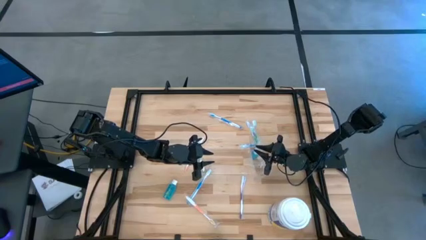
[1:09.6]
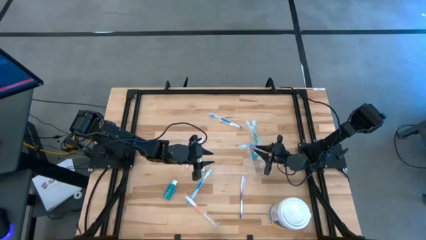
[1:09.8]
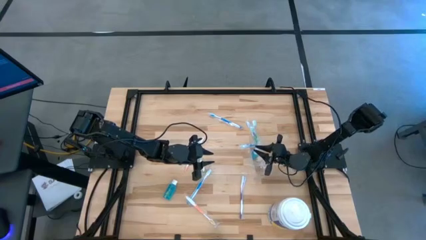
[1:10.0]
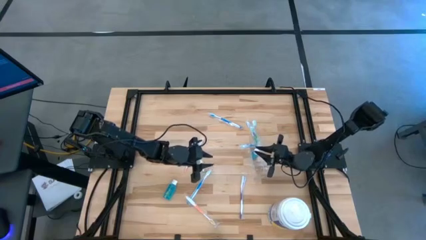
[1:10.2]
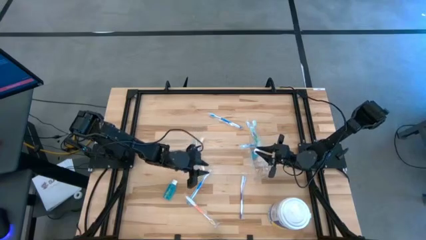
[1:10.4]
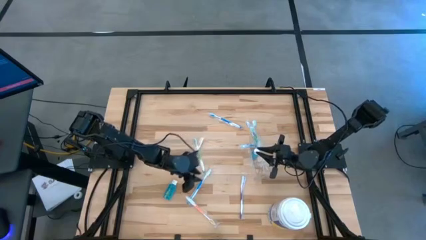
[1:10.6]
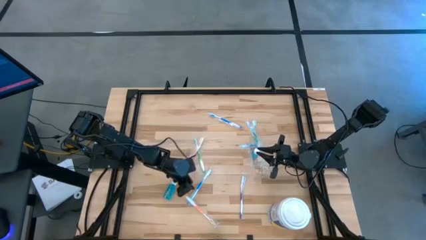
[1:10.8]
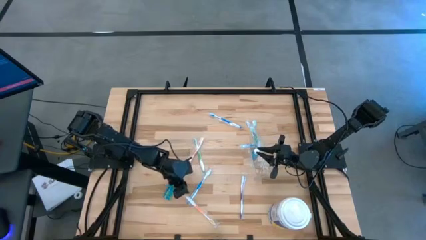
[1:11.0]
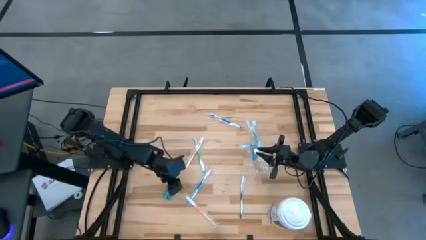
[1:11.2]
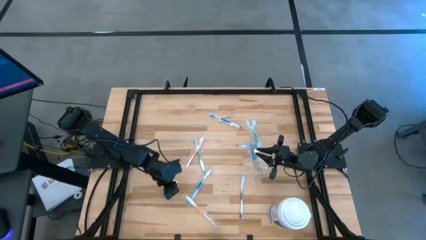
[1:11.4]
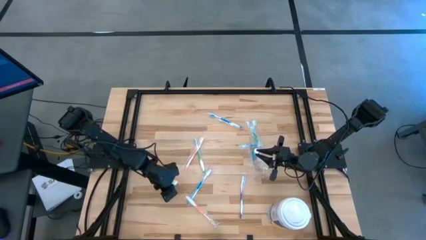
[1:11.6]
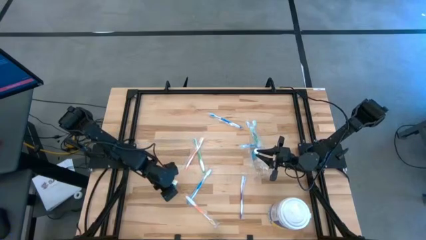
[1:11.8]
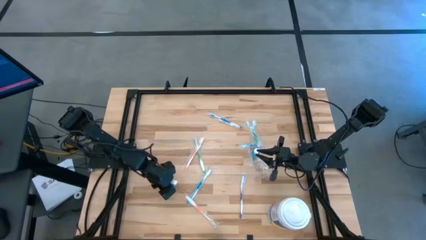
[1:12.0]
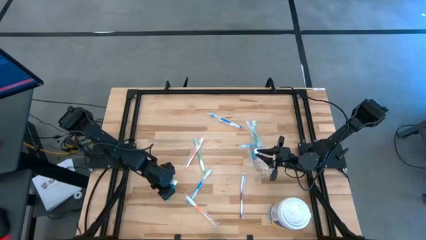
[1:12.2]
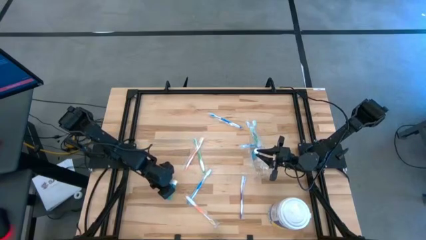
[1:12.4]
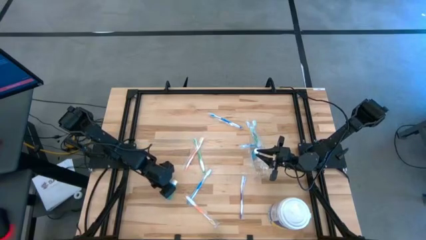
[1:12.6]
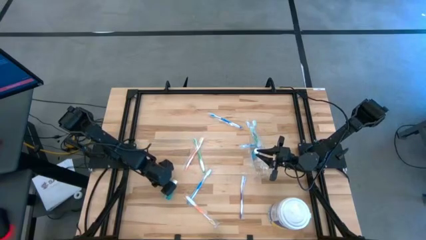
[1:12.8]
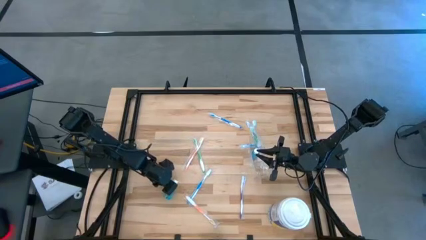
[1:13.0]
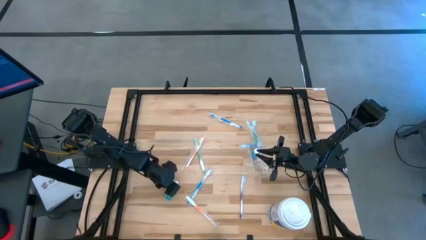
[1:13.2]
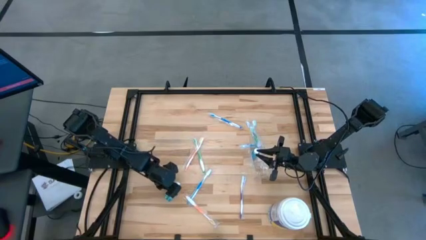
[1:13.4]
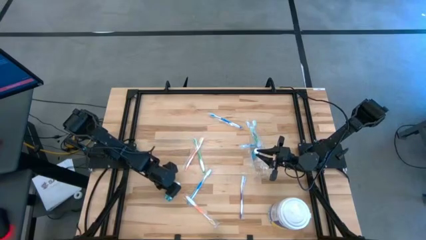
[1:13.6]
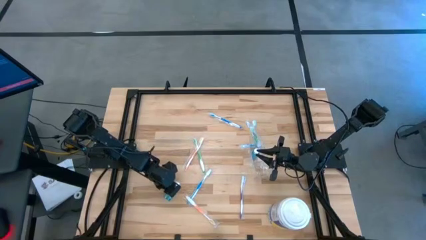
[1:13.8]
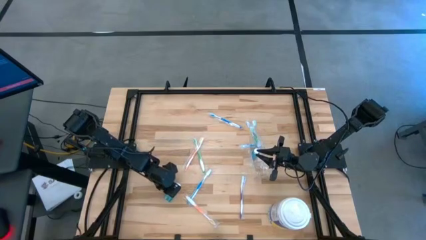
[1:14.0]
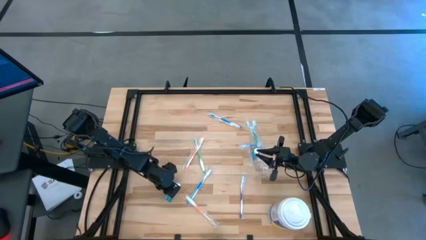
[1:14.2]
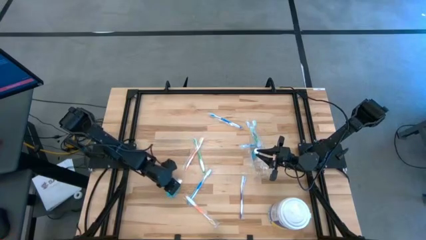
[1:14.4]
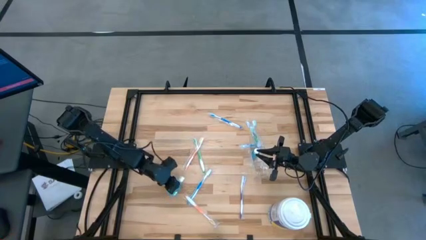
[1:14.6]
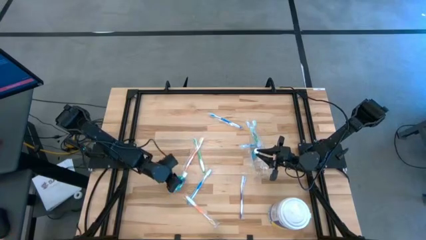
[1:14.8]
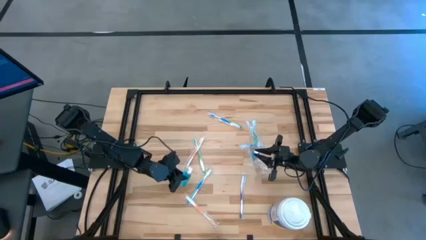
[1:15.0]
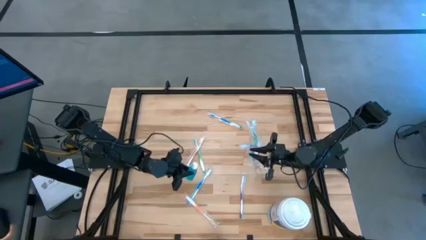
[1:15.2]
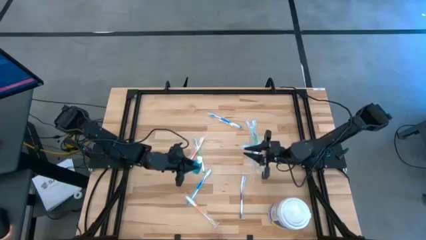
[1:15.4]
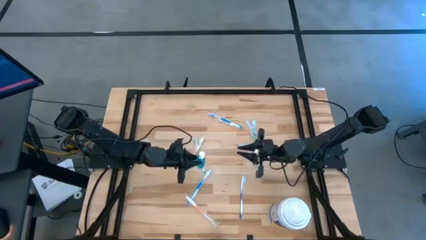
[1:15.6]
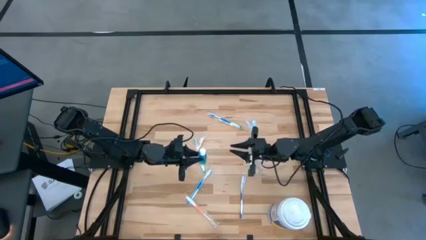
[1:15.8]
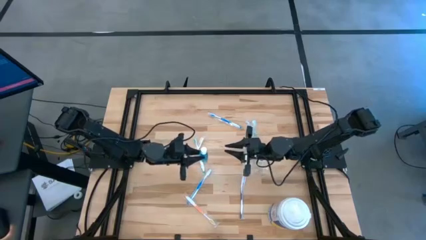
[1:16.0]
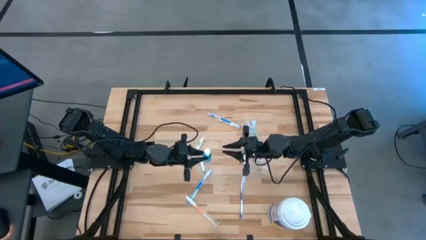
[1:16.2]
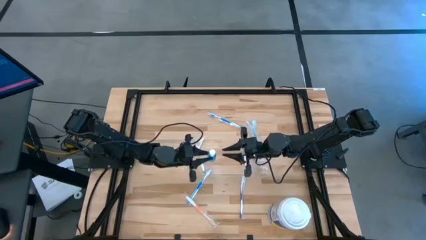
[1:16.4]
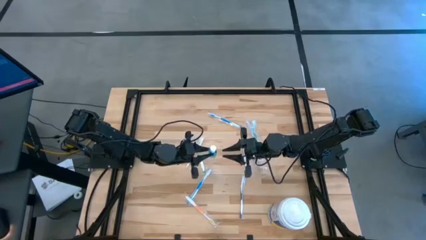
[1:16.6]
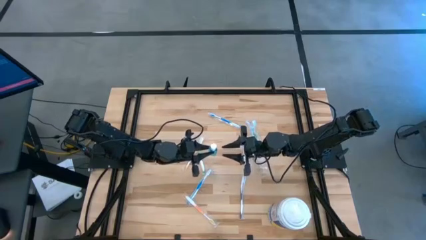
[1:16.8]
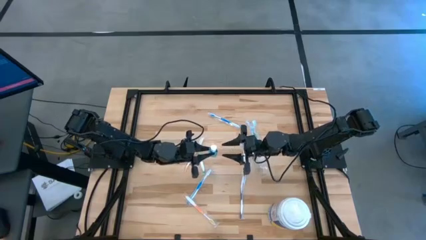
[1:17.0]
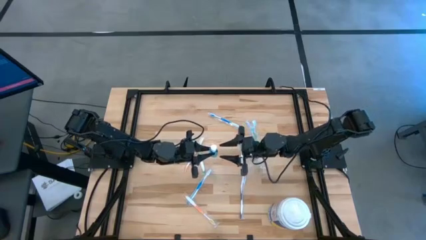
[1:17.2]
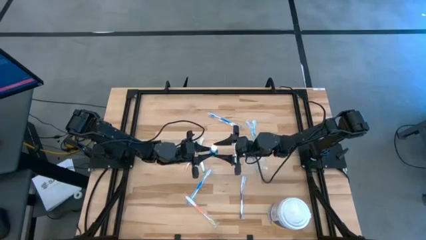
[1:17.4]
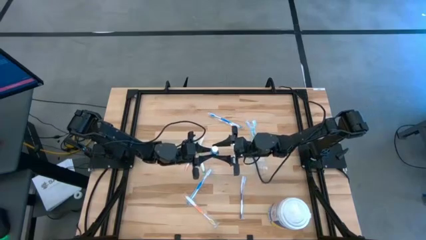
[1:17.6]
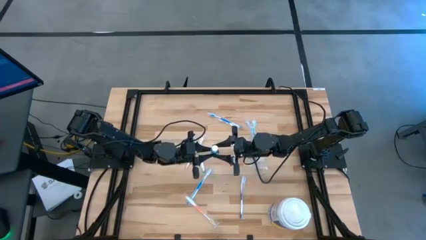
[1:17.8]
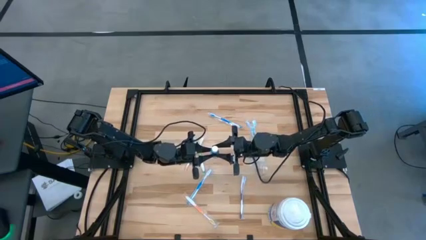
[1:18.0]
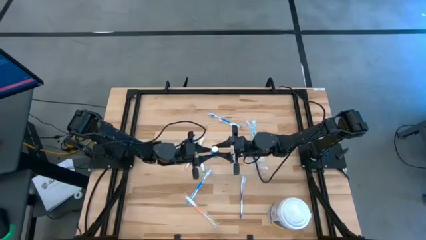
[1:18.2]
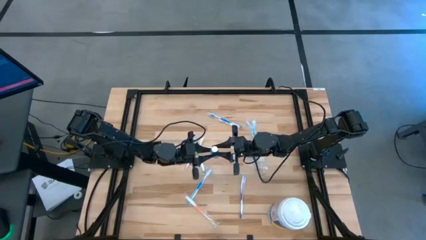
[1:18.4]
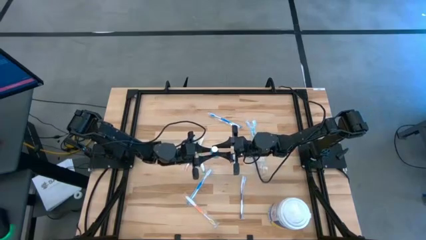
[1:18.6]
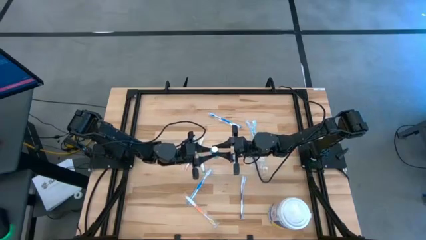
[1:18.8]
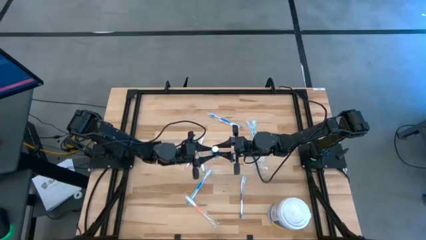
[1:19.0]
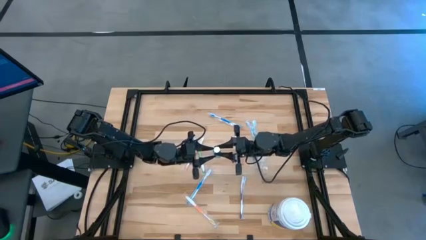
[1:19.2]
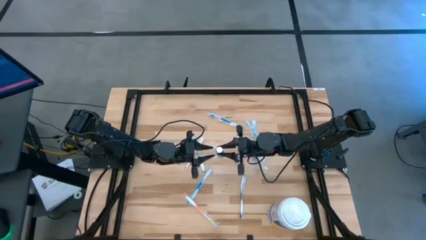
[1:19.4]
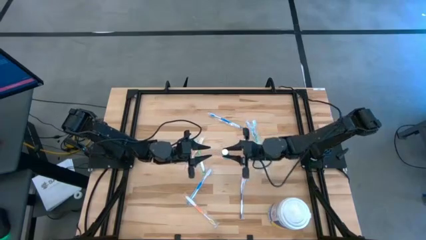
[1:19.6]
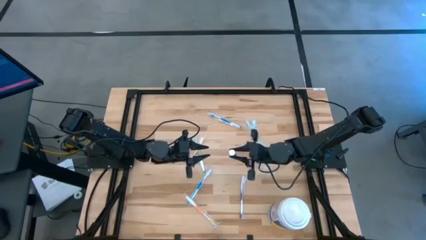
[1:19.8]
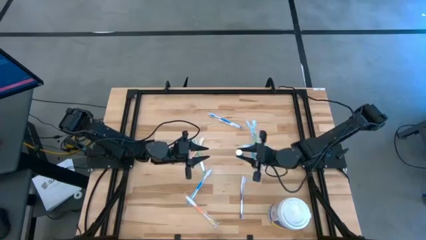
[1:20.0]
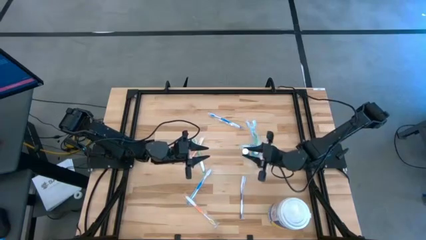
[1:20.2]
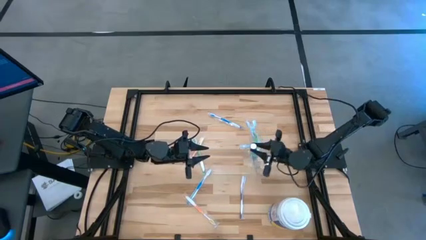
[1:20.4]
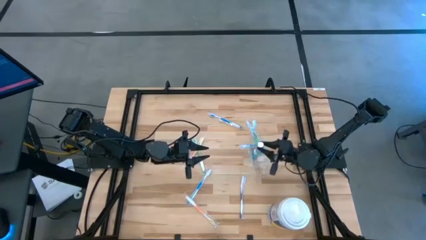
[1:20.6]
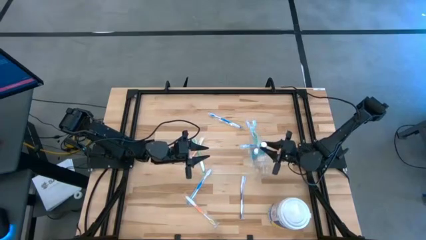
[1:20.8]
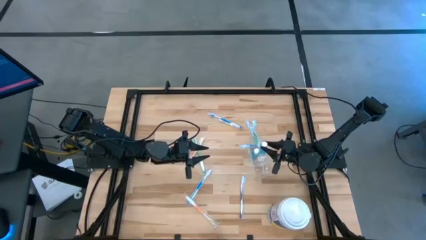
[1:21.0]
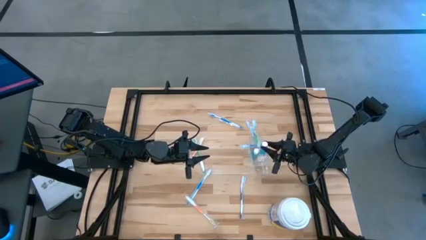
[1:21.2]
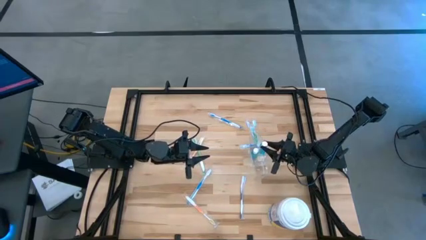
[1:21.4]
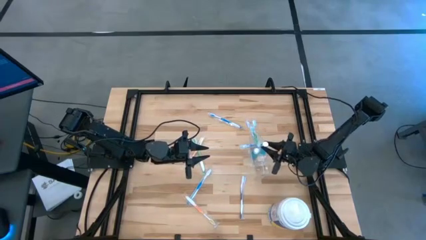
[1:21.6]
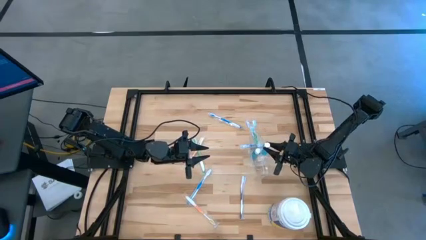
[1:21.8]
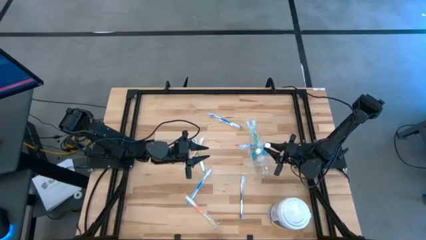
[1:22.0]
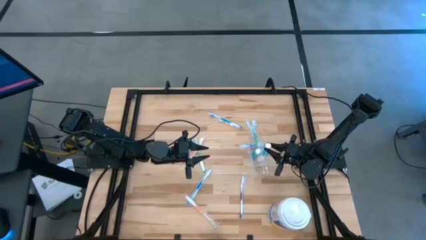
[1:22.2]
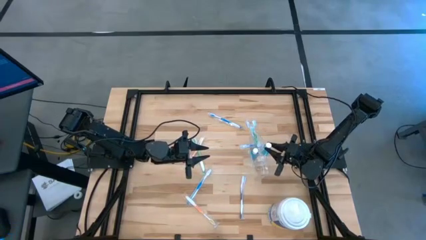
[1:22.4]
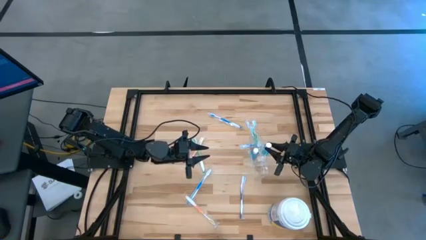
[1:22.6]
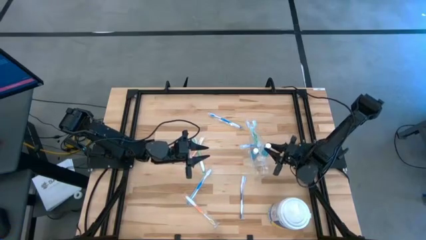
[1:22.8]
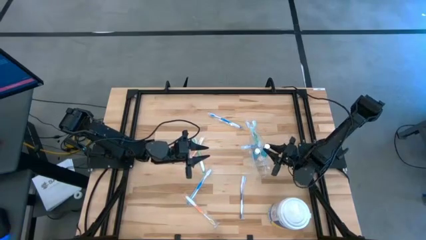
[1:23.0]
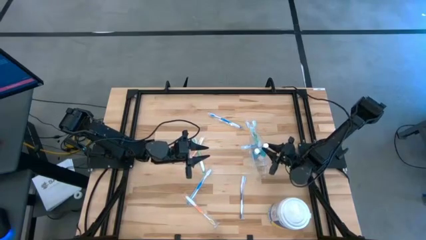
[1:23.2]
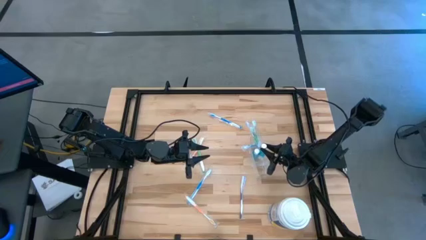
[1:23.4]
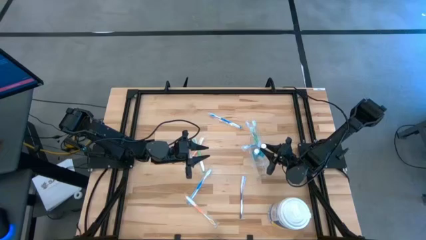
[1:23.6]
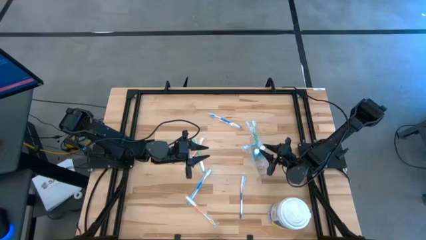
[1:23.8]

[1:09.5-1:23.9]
Task: Pick & Place toothbrushing station
Put the blue mouthwash into the transparent organizer
